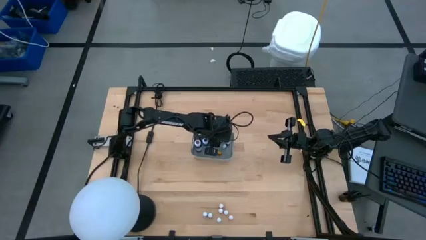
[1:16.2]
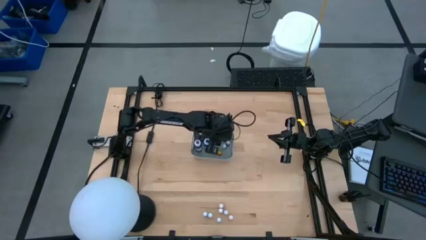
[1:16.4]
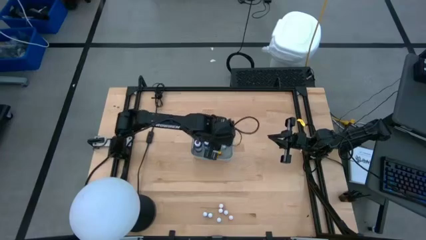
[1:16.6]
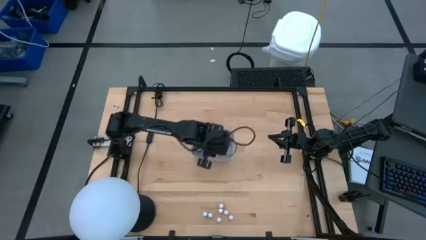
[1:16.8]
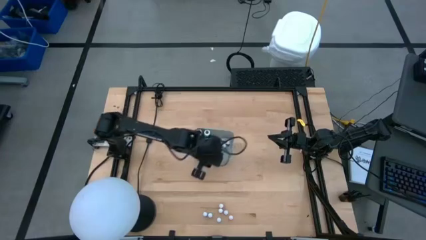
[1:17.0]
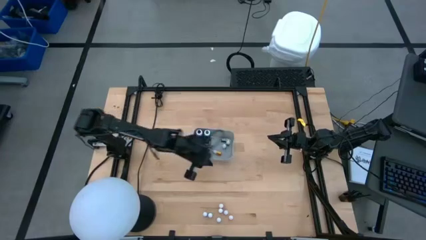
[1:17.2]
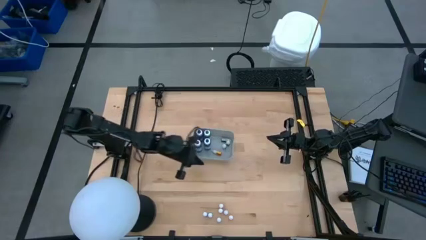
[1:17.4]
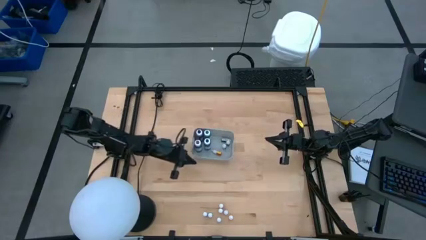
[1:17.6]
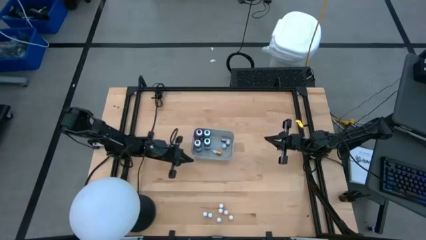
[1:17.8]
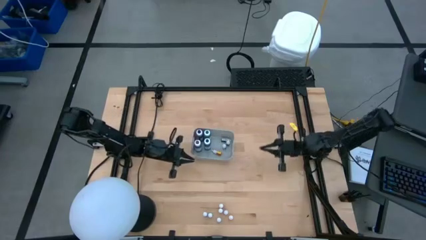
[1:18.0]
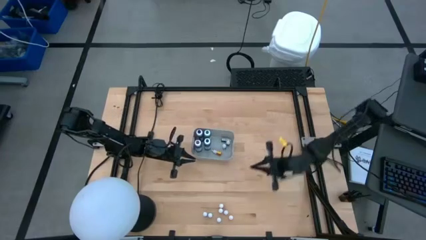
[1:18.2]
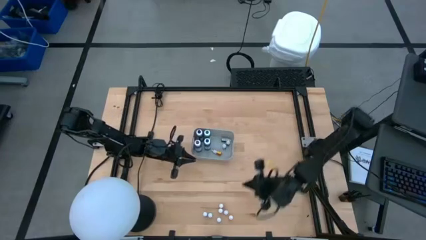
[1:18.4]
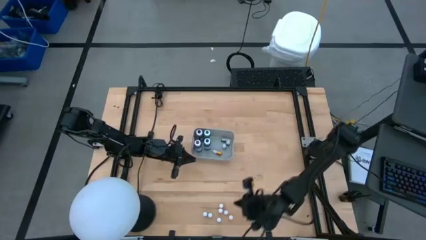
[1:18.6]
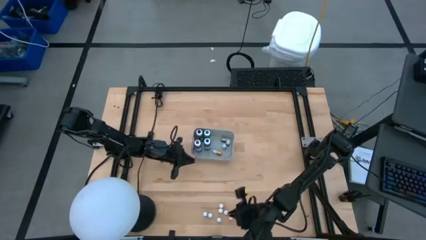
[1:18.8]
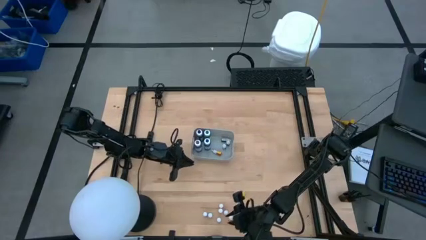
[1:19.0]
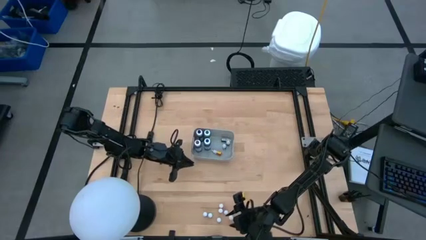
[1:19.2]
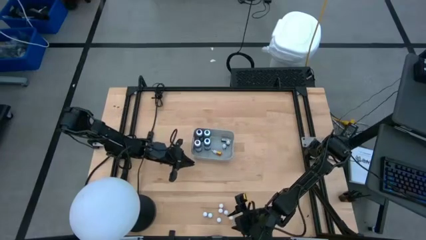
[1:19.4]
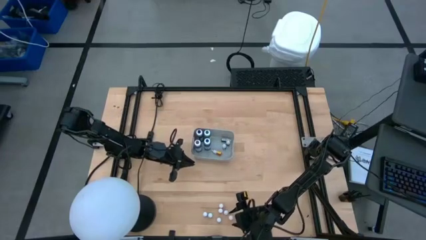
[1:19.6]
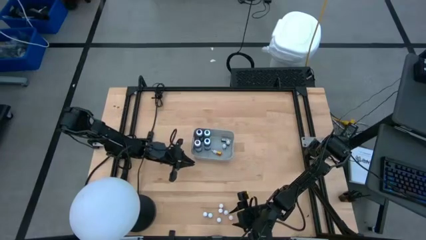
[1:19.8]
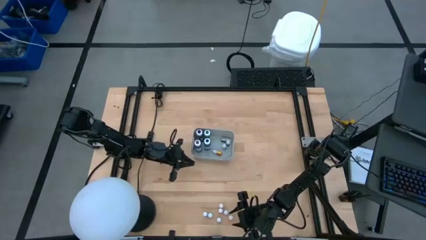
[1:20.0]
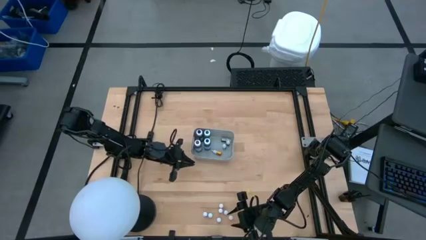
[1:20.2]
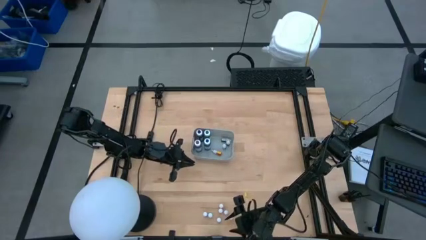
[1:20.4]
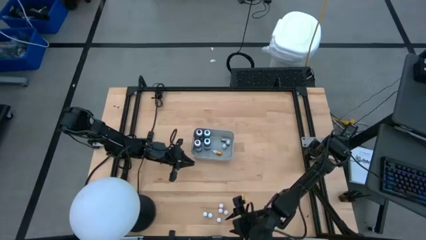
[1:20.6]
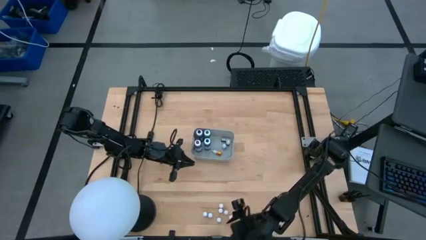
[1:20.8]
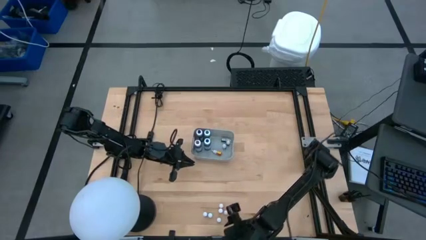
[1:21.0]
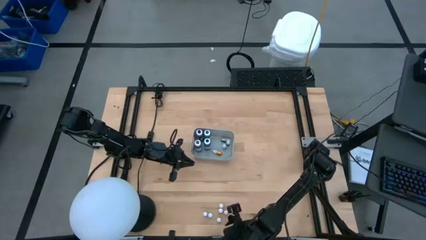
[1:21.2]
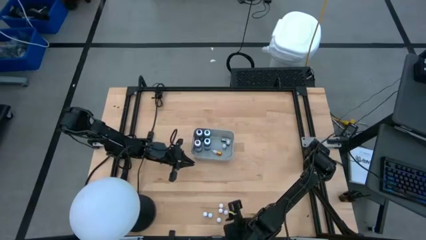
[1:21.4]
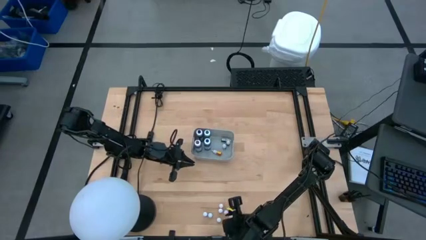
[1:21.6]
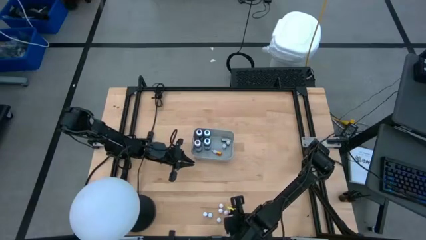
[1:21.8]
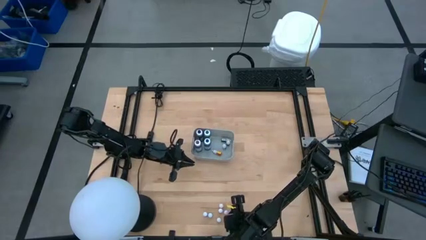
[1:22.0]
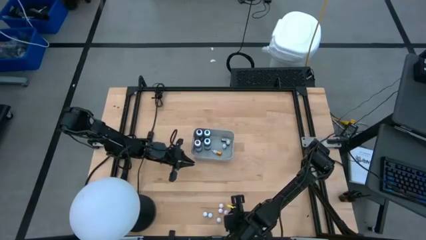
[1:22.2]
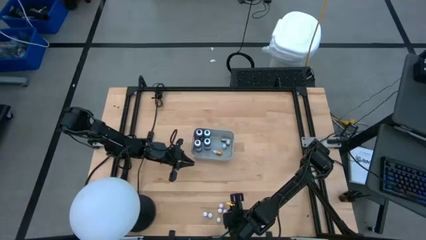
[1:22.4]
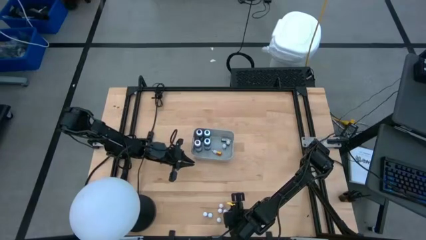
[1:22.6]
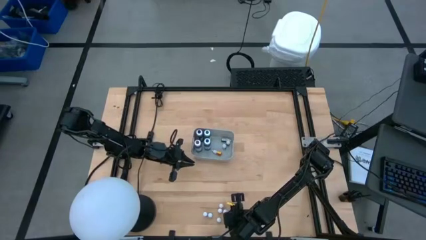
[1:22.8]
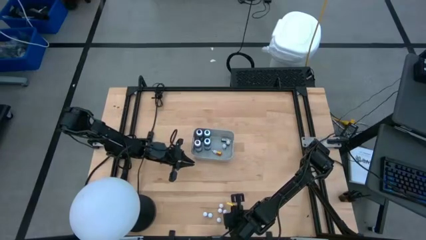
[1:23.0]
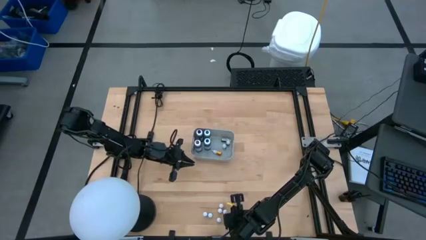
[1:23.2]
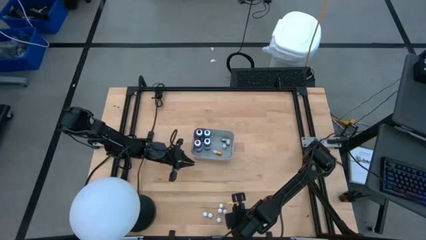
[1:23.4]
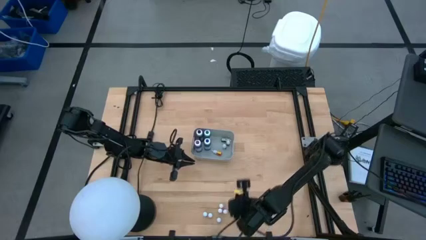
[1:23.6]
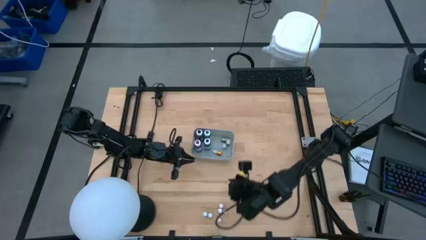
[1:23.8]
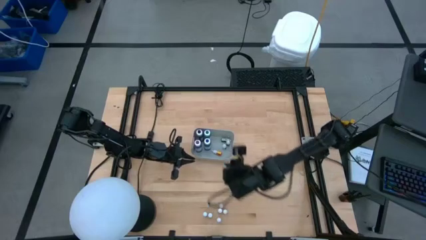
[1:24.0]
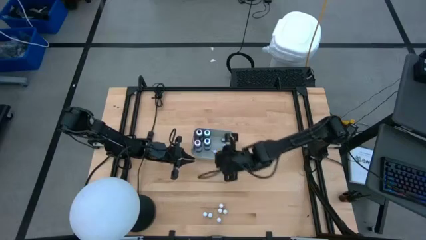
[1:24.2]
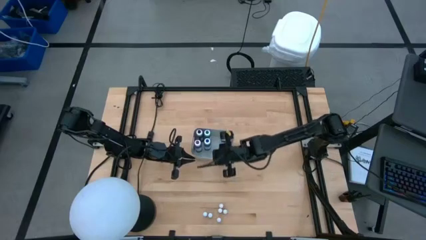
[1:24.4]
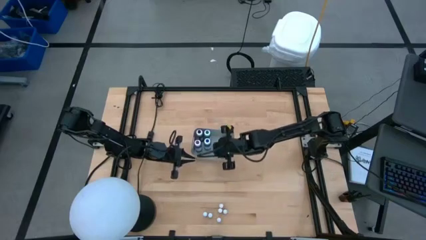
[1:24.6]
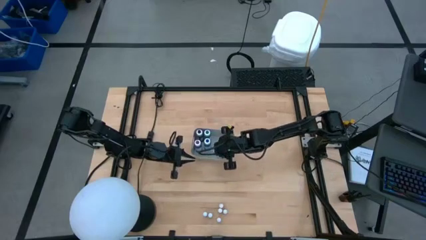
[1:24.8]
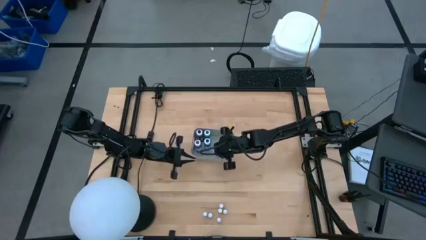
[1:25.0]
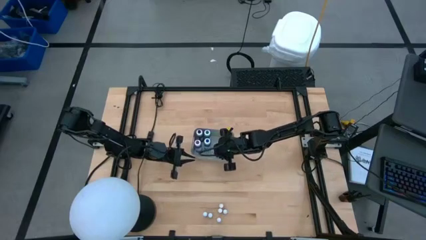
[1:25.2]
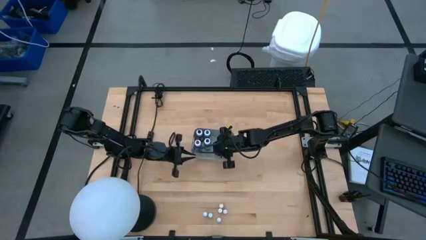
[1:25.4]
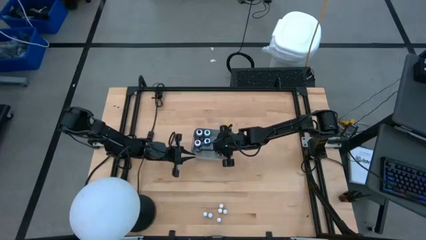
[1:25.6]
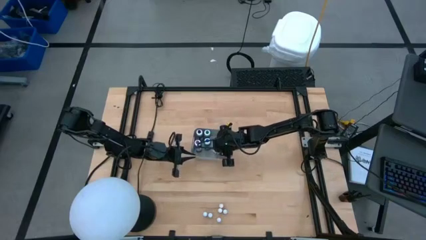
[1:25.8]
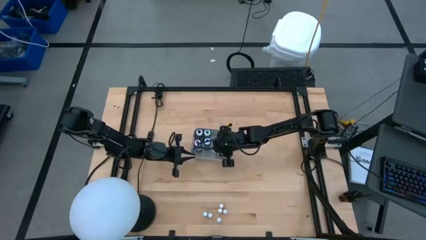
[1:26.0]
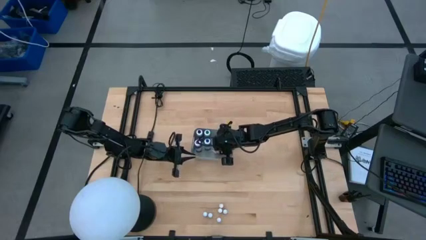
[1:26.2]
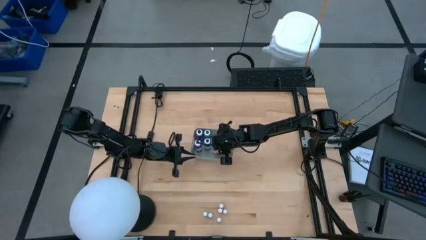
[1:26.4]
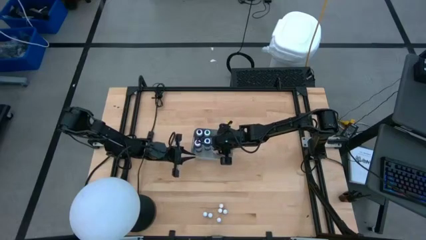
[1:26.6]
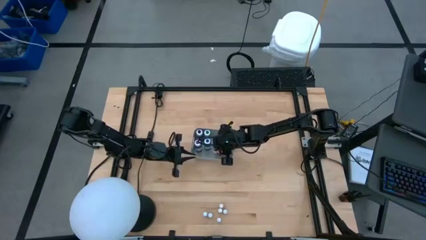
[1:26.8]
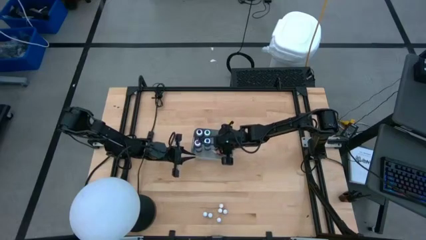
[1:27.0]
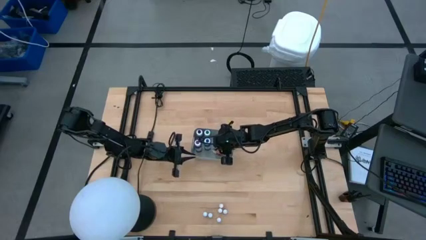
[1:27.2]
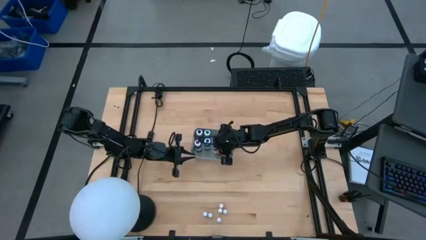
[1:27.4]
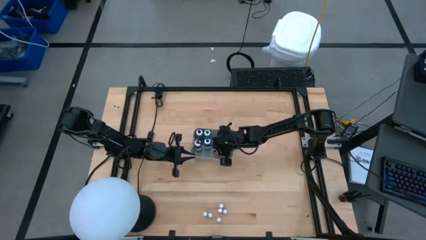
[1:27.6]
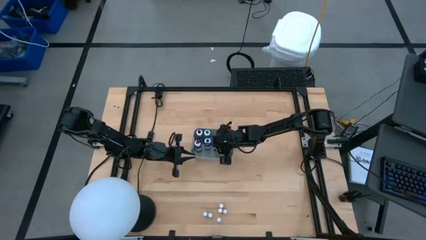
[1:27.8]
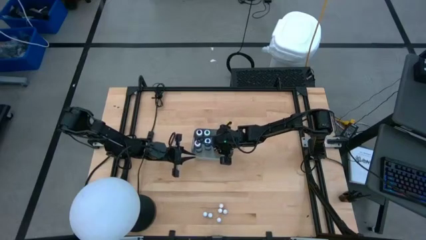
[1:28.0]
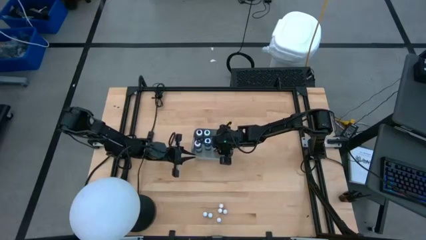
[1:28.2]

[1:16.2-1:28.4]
Task: Pick & Place food coloring
Put the small orange food coloring bottle into the gray bin

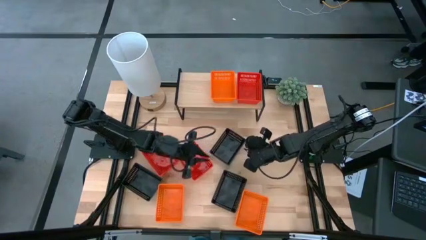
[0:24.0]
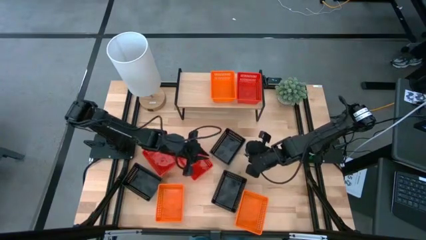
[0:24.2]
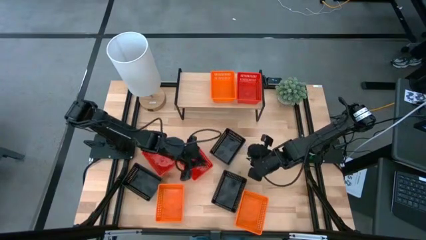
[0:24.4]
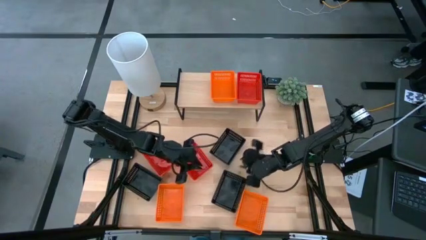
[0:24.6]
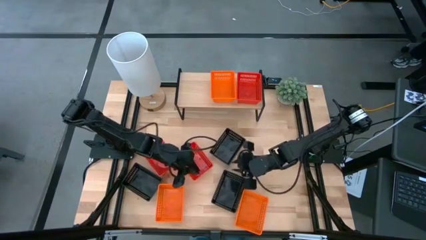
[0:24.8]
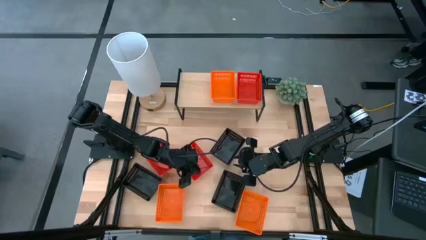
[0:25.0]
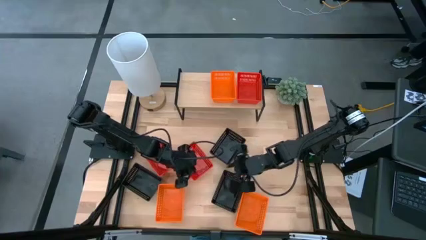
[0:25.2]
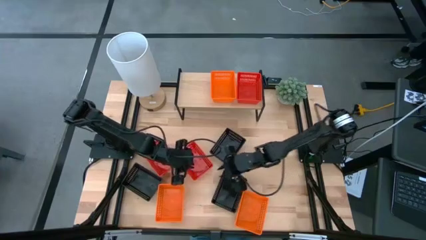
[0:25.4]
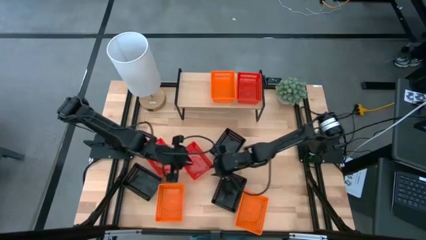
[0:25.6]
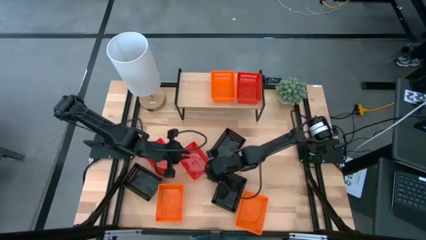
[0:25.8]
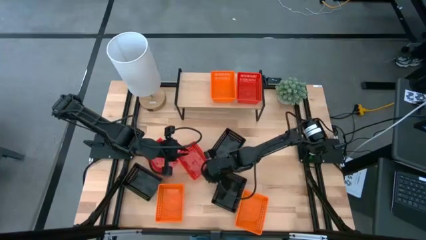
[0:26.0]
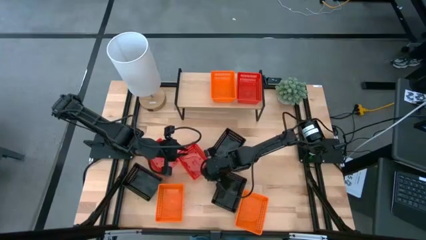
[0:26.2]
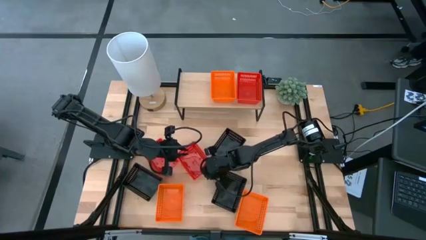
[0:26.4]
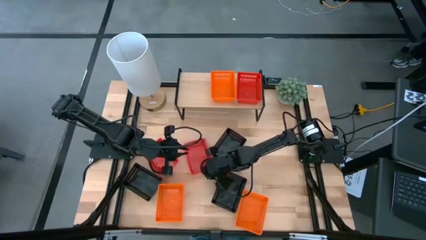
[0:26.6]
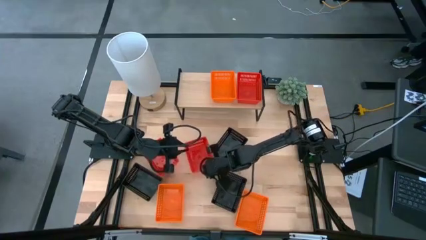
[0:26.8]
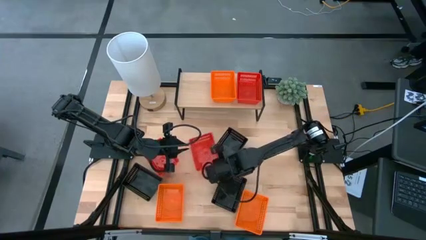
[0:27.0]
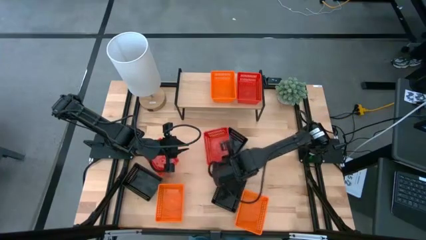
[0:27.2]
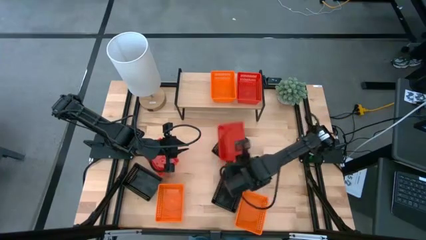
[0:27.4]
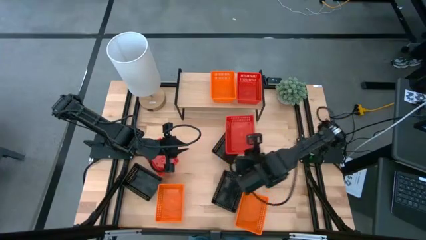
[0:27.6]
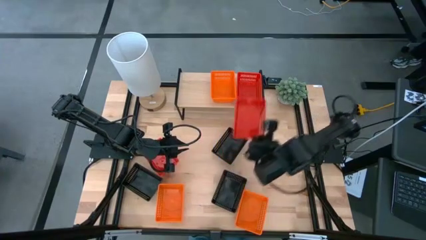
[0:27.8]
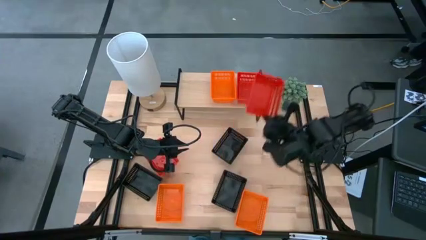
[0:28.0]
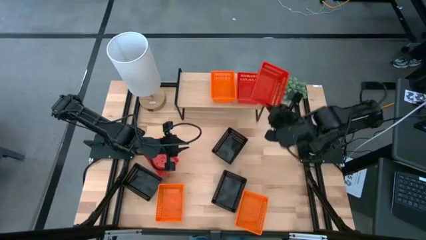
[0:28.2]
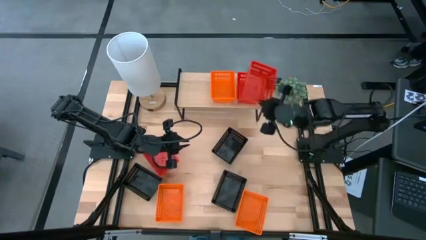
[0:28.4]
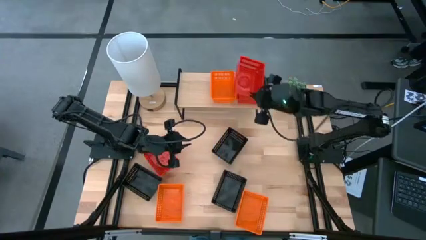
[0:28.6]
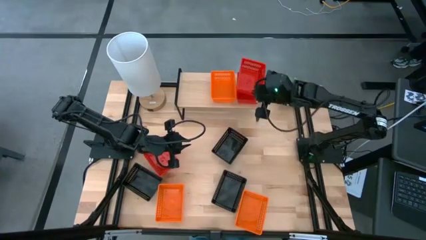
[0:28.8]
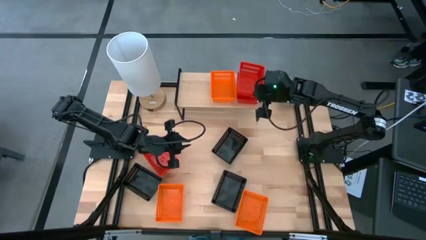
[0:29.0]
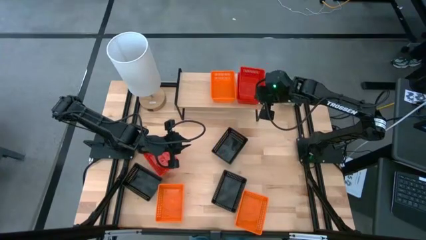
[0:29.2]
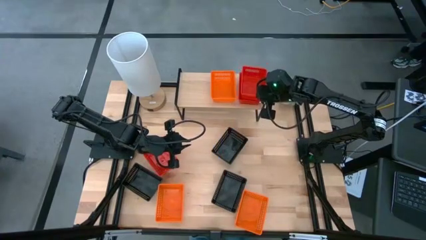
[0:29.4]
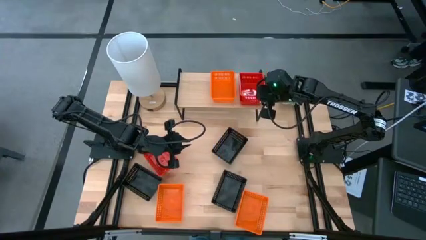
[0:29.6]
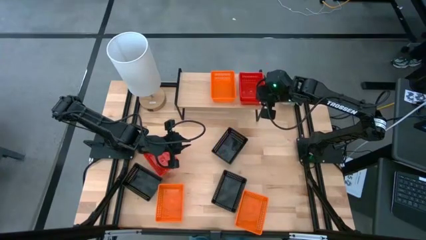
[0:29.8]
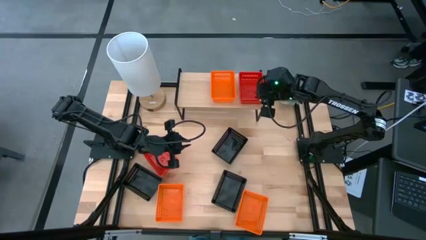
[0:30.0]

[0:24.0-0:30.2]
Task: Stack baskets on shelf by color
Stack the right red basket on top of the red basket on the shelf
